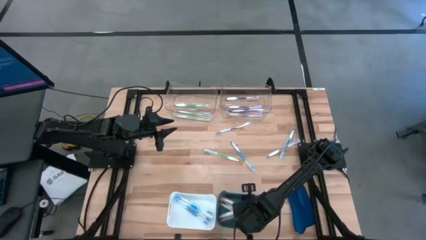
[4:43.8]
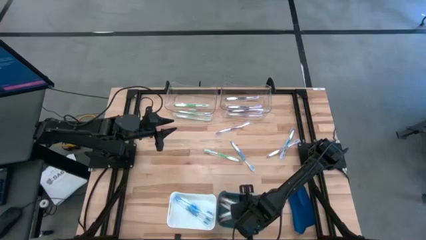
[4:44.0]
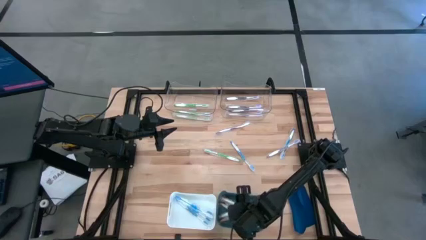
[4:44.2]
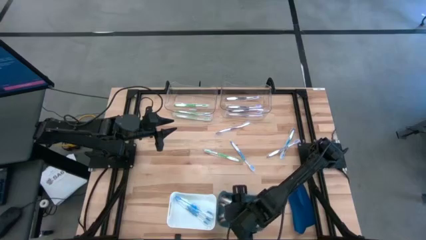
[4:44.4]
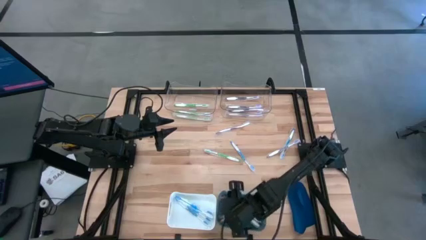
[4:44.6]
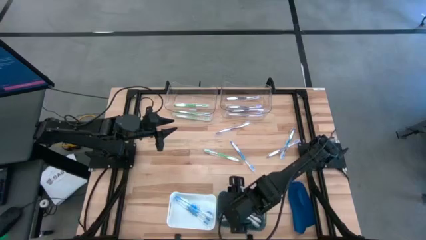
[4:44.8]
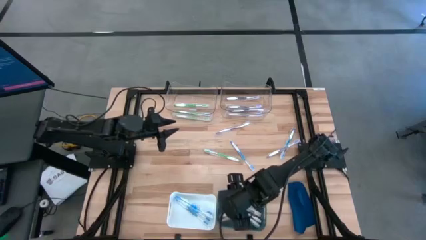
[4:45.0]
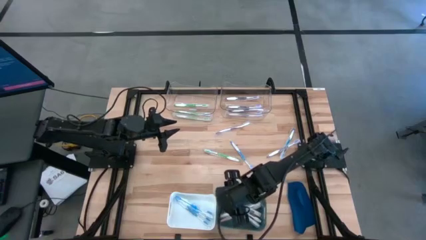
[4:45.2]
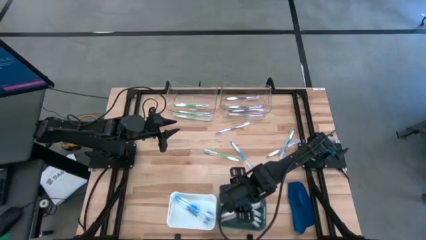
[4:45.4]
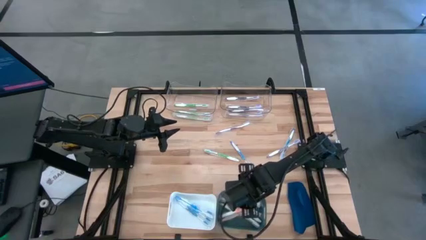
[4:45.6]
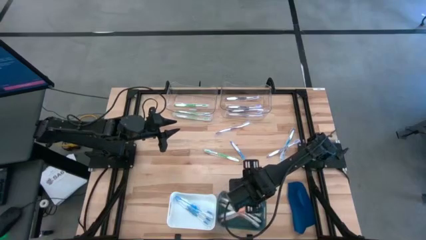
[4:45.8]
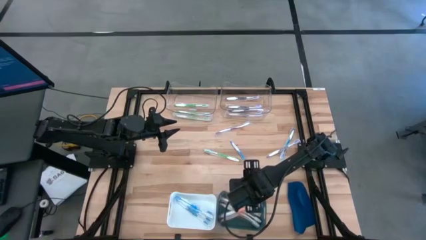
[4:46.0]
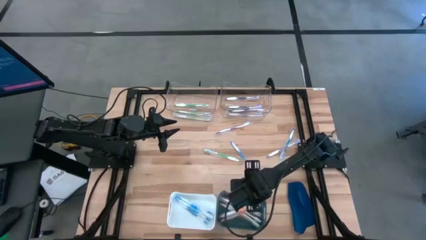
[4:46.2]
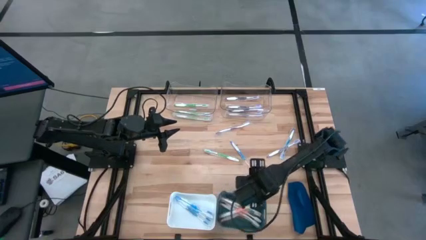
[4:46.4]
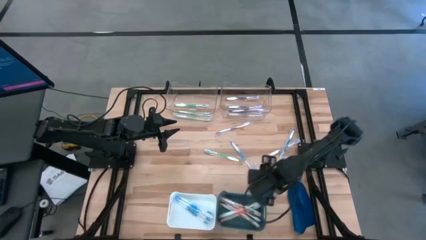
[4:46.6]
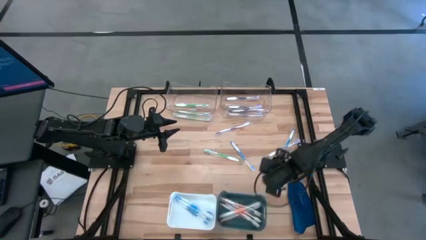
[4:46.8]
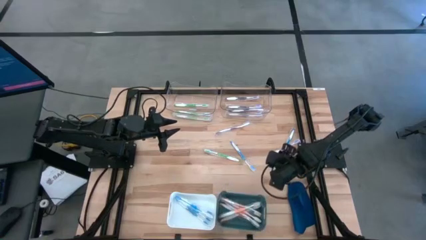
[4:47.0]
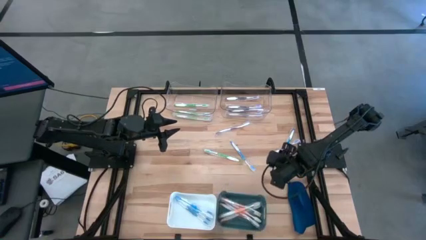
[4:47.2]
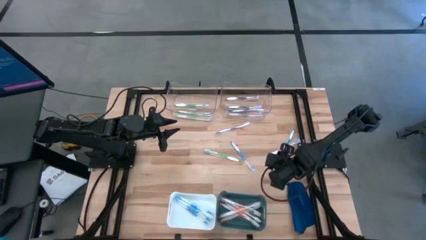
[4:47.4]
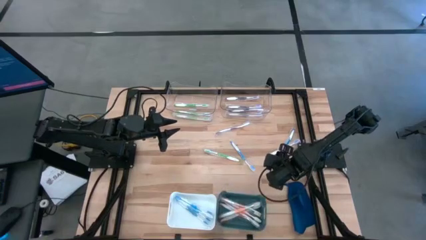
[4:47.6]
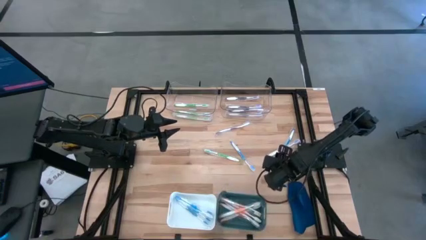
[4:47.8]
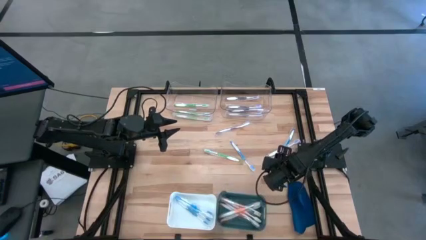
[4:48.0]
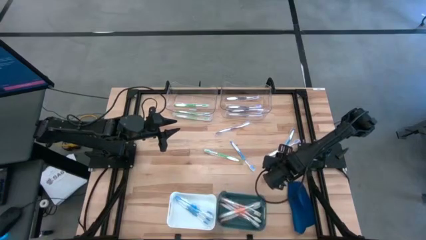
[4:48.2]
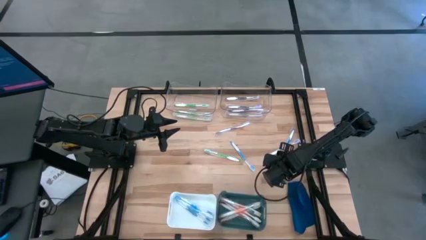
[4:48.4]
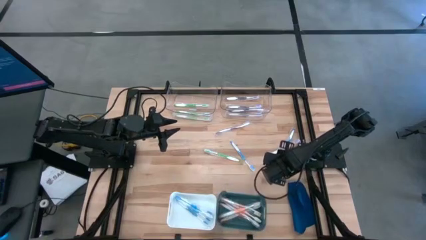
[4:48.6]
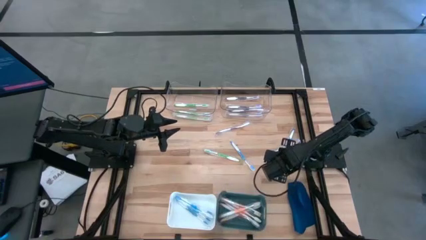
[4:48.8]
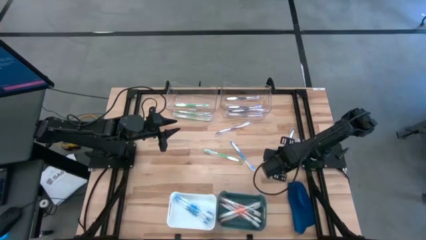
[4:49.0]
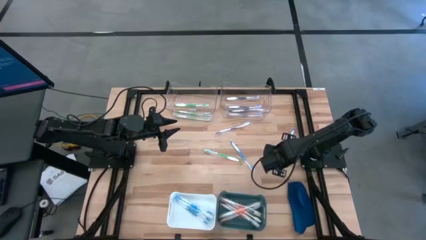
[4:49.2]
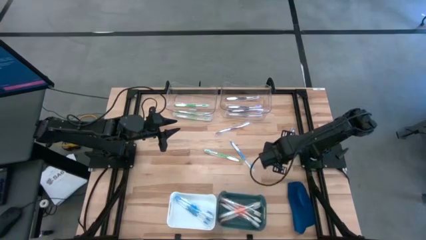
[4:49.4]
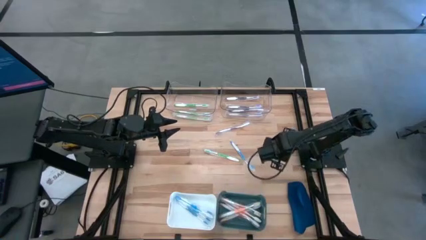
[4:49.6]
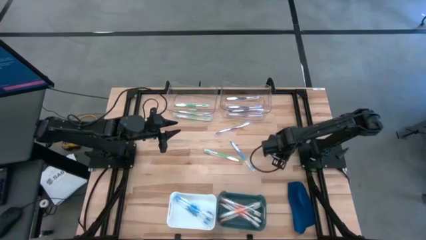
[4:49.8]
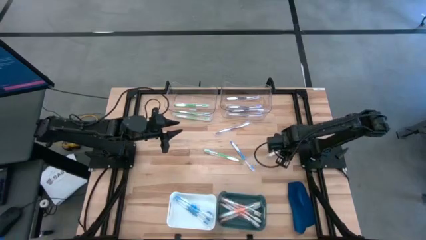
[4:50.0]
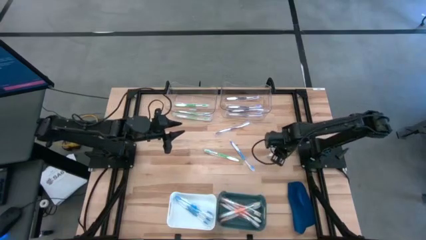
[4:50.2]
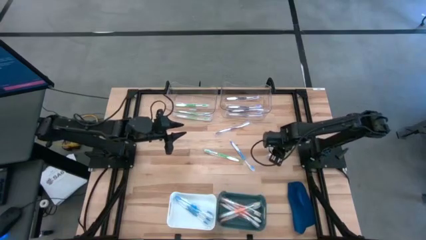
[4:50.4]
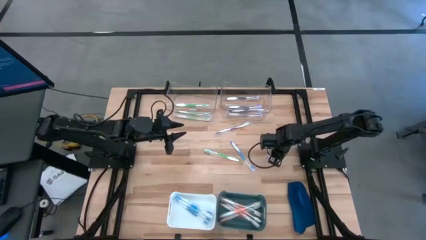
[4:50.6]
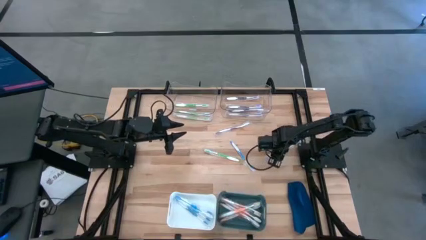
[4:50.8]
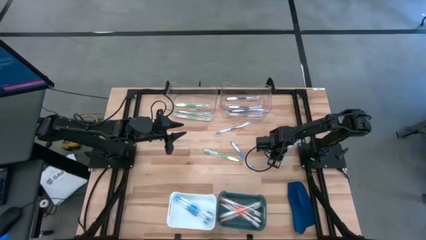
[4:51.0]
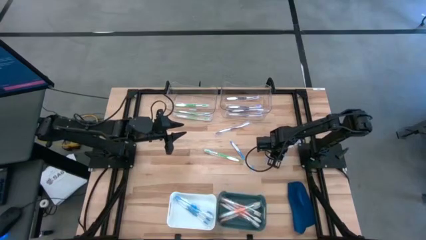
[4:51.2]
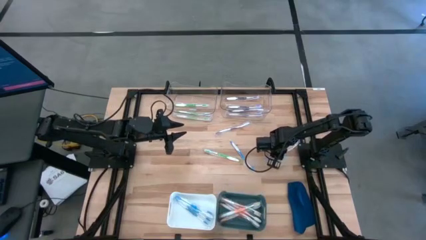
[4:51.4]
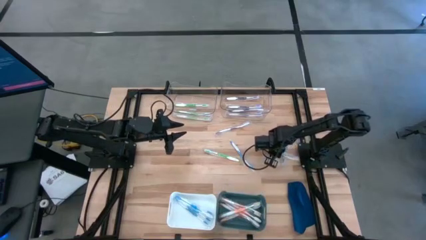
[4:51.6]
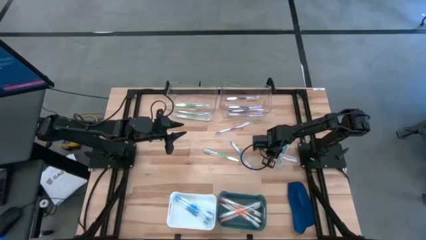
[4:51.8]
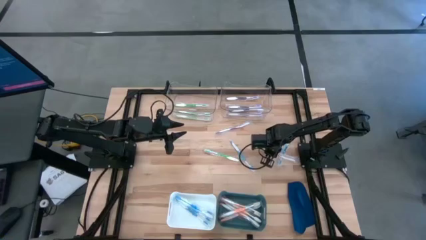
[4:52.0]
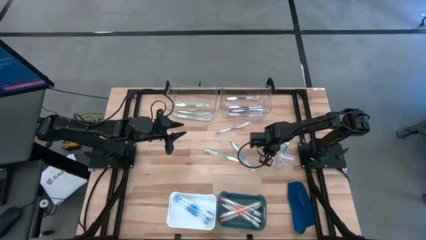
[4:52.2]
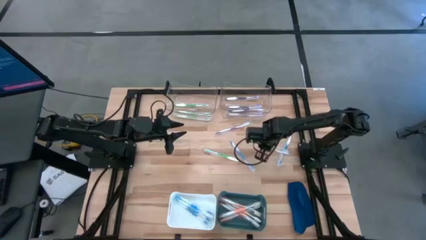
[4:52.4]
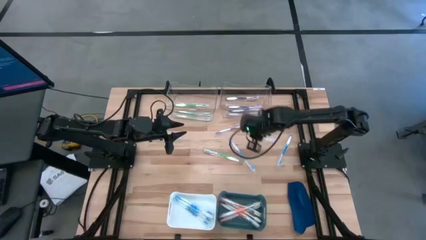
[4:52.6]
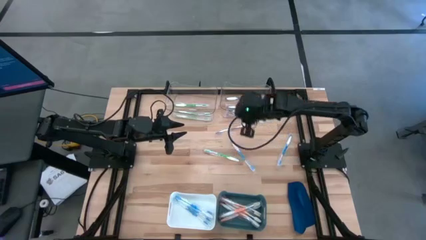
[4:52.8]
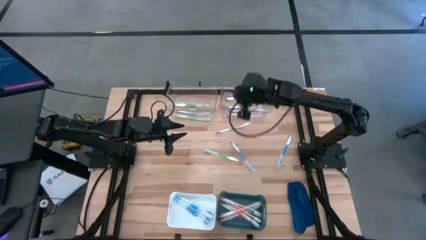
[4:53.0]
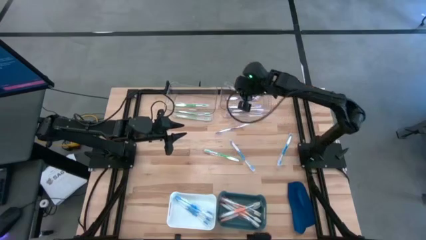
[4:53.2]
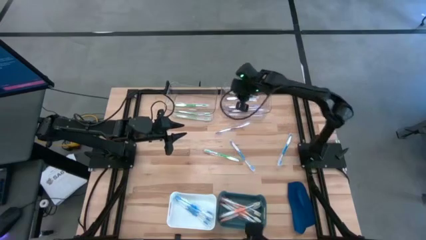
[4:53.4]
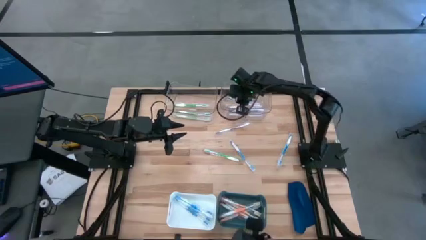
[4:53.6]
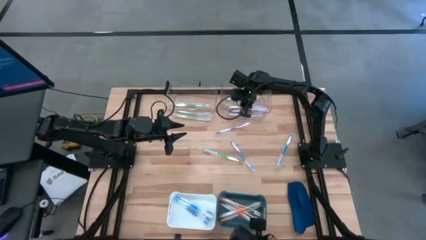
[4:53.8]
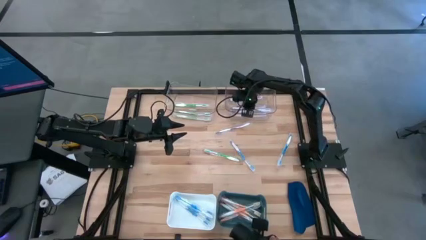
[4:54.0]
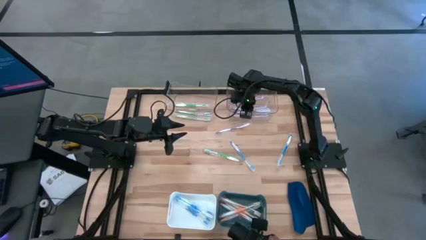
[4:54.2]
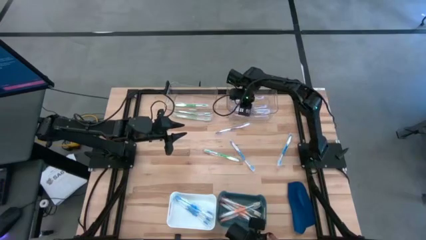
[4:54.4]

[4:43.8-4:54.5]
Task: Pick & Place Toothbrushes
Put the purple toothbrush into the right transparent bin

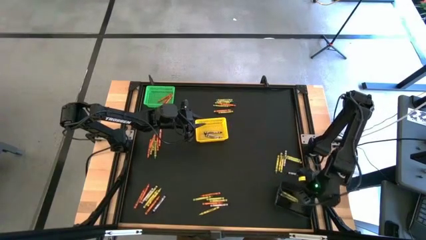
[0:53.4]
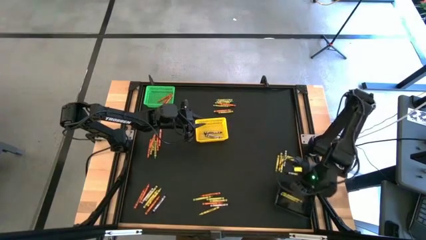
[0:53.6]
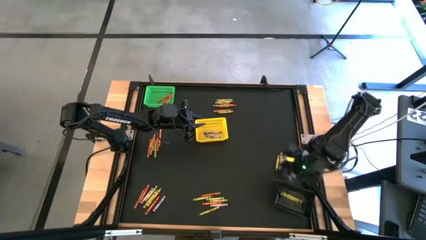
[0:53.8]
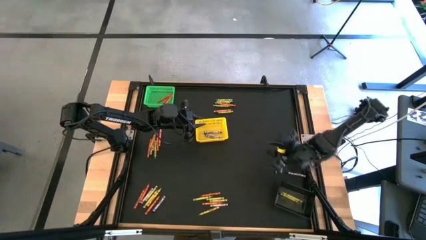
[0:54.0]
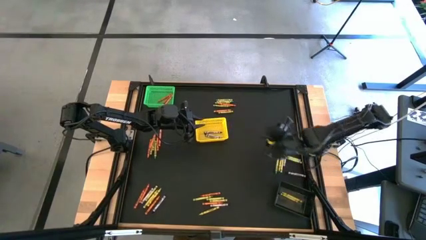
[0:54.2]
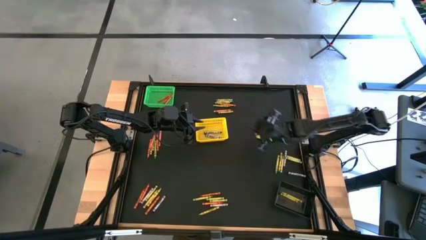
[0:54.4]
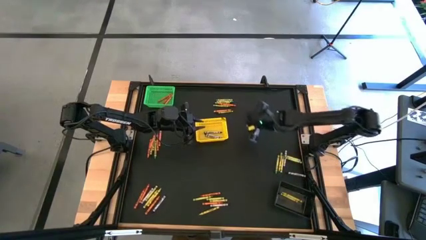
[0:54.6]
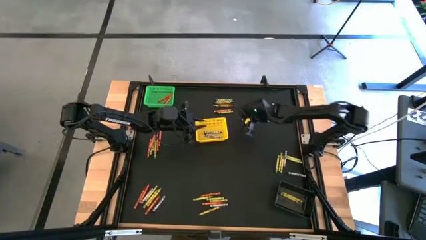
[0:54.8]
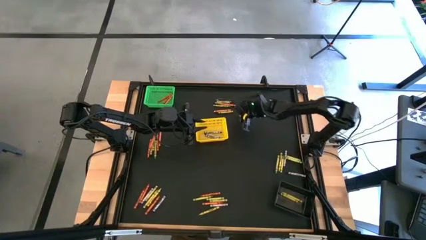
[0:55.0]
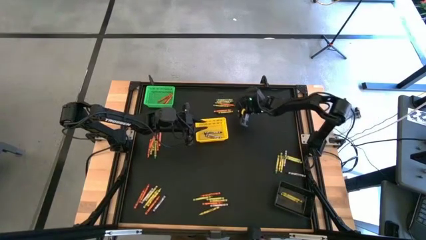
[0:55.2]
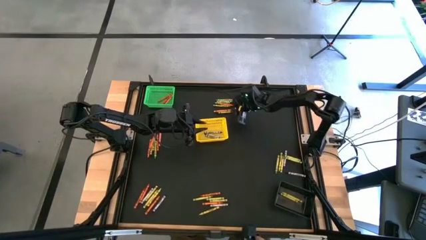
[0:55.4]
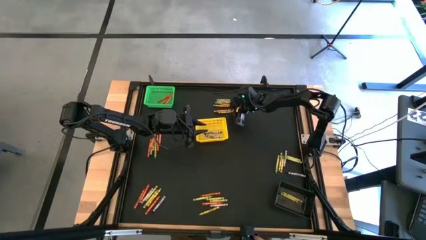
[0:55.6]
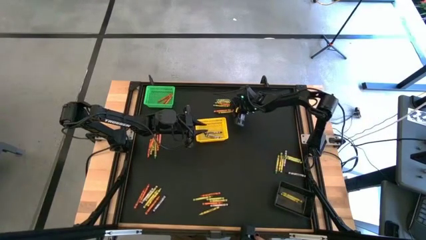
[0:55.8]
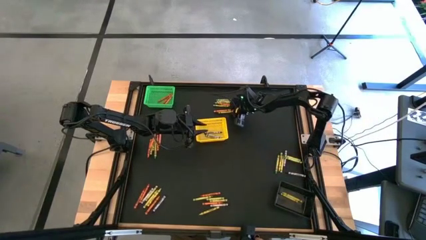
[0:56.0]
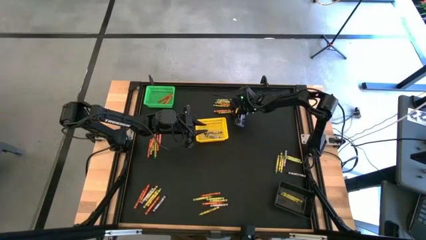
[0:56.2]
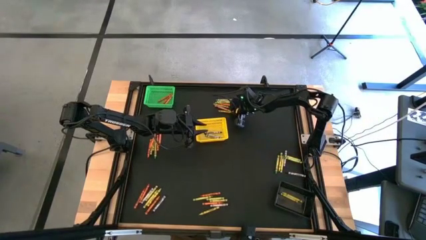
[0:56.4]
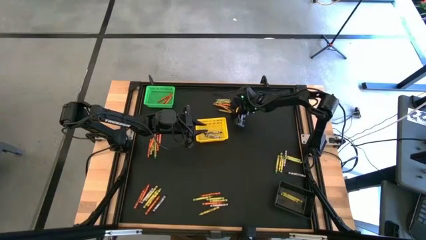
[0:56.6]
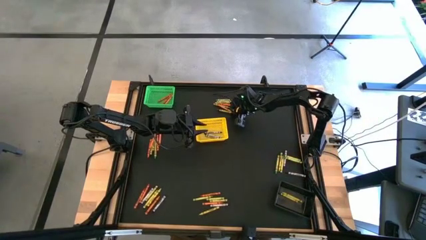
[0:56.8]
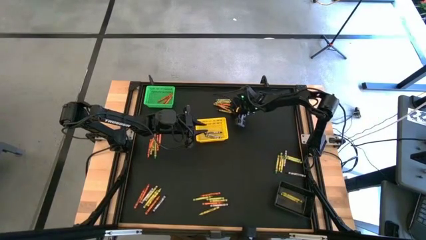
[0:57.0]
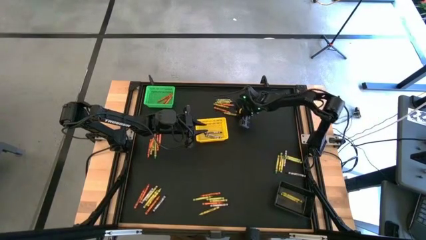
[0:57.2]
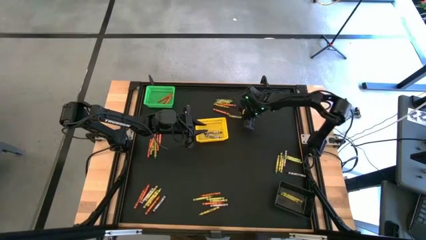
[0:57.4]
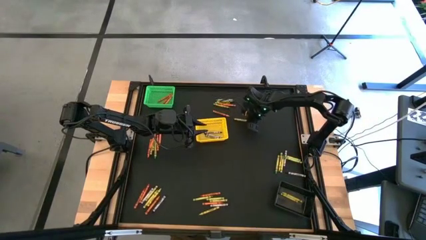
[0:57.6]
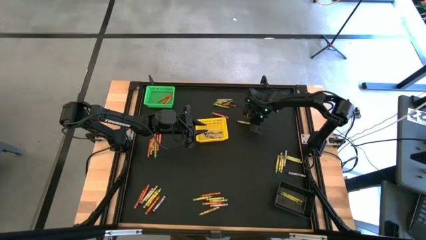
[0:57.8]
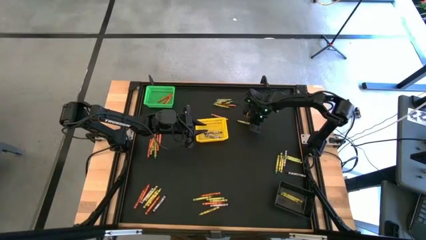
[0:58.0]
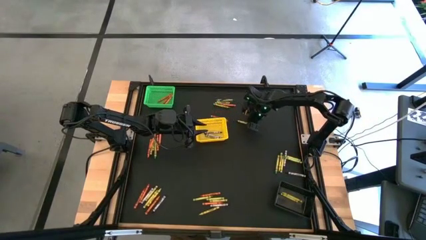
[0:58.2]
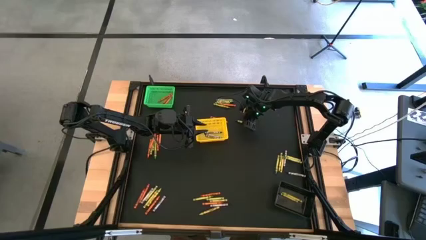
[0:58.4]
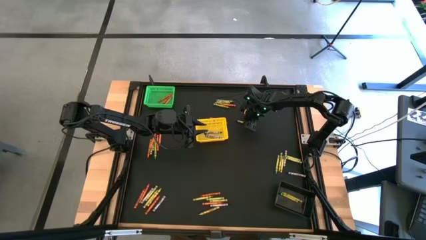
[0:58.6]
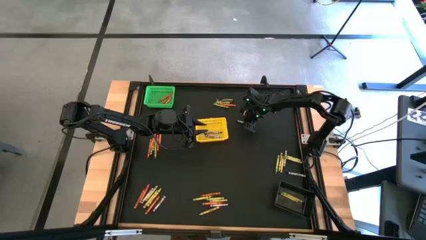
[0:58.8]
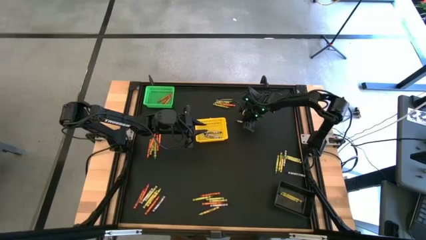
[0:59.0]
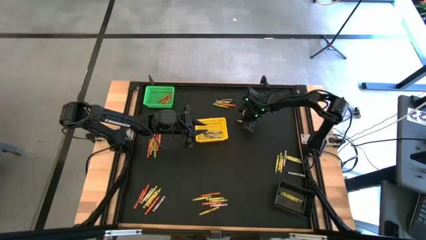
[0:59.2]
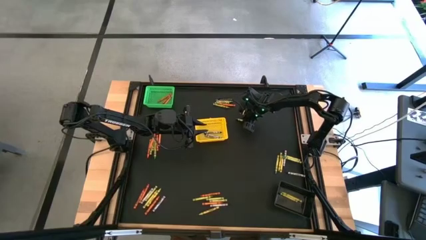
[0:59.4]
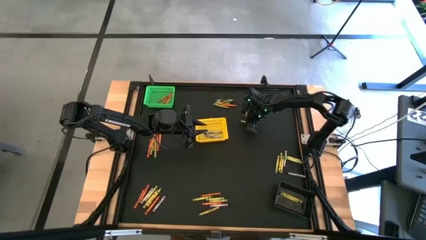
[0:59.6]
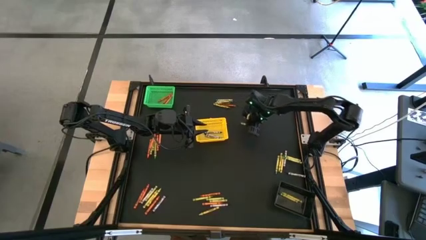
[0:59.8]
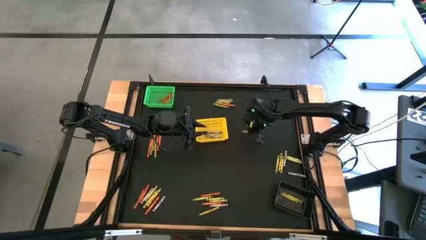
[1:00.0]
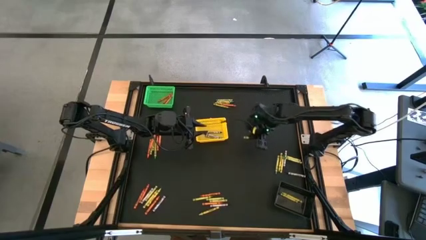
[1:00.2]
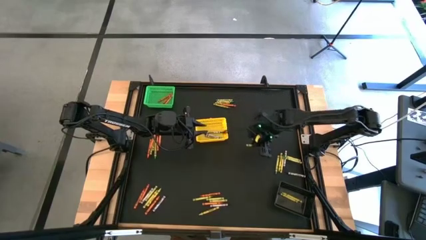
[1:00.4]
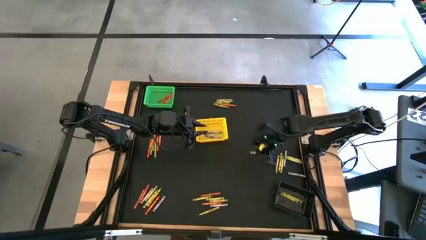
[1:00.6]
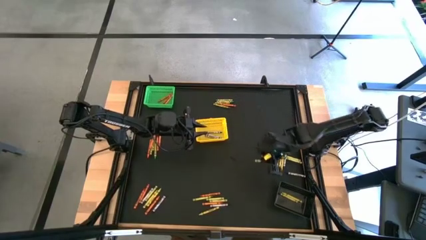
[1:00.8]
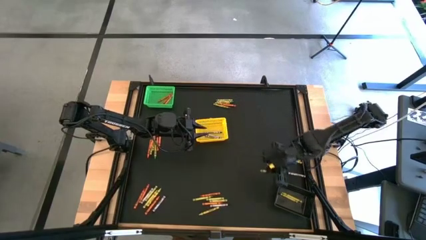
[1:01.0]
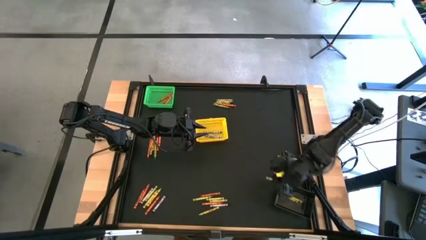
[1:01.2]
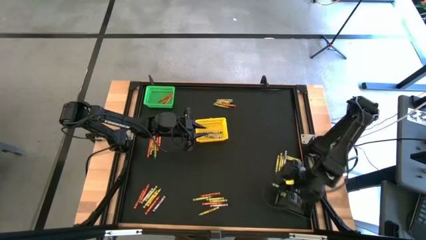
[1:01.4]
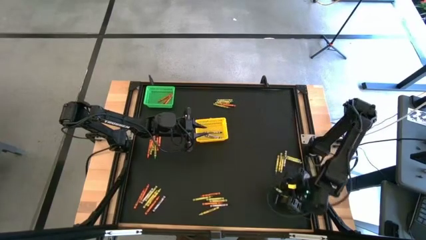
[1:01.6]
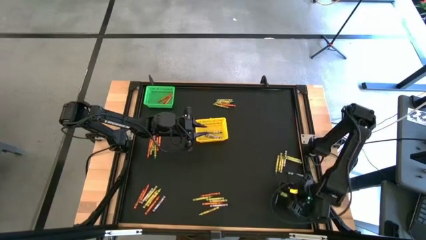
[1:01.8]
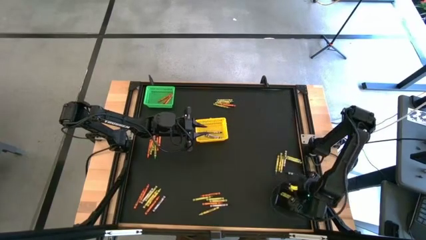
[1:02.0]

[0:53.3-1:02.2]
Task: Sort crayons
Put the green crayon into the black bin
